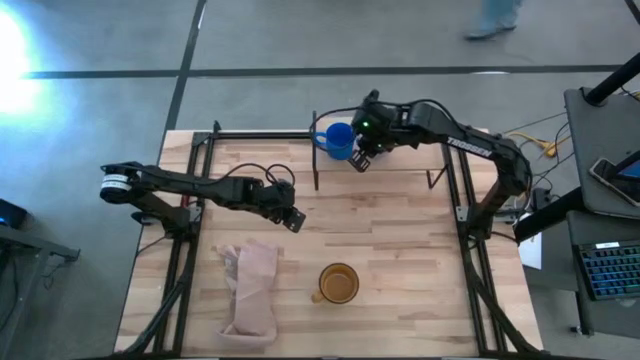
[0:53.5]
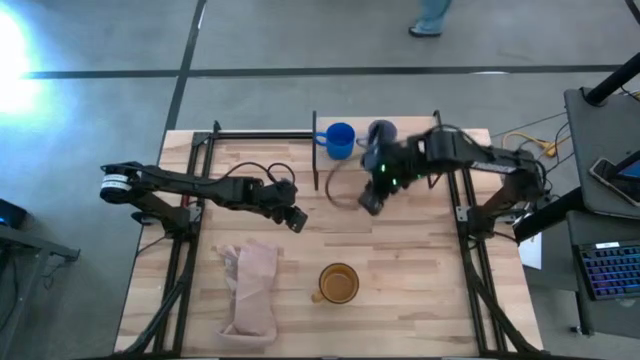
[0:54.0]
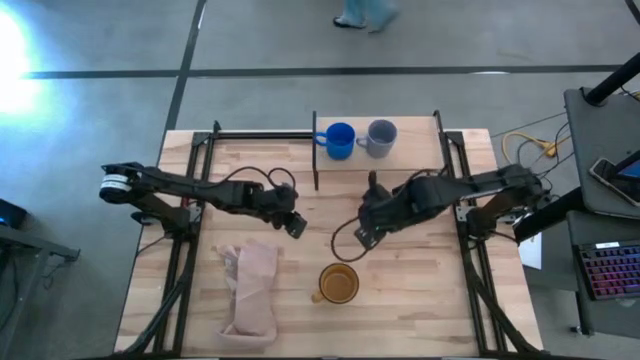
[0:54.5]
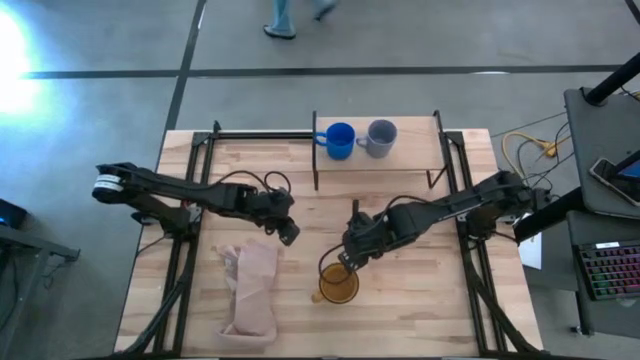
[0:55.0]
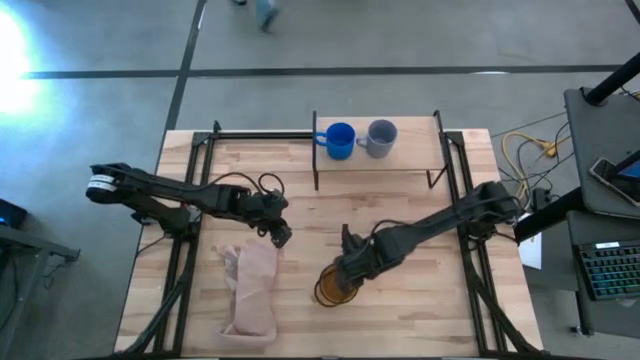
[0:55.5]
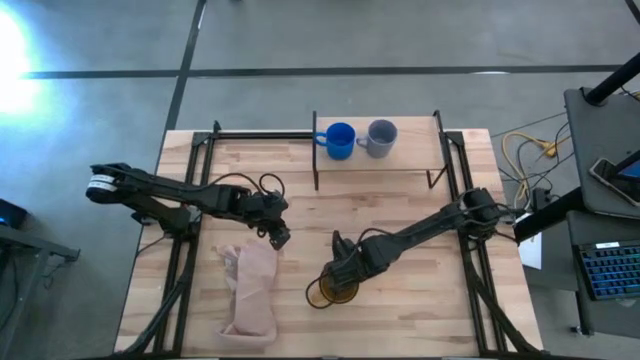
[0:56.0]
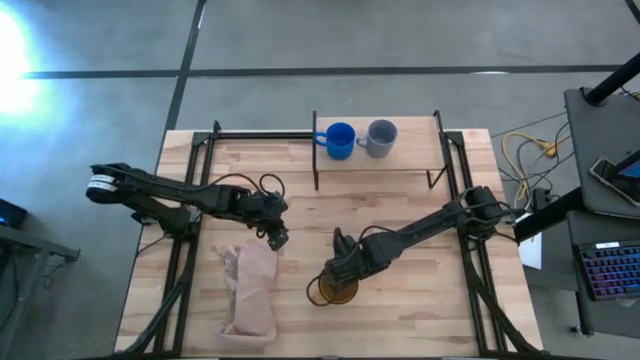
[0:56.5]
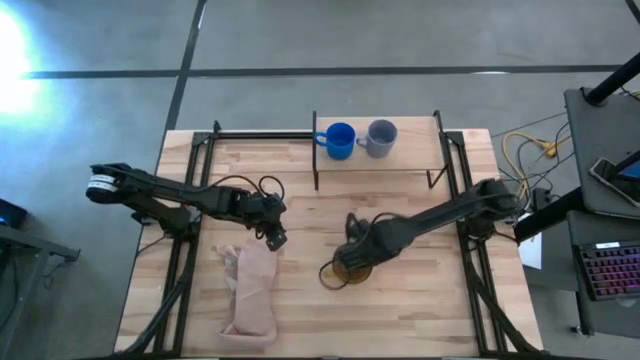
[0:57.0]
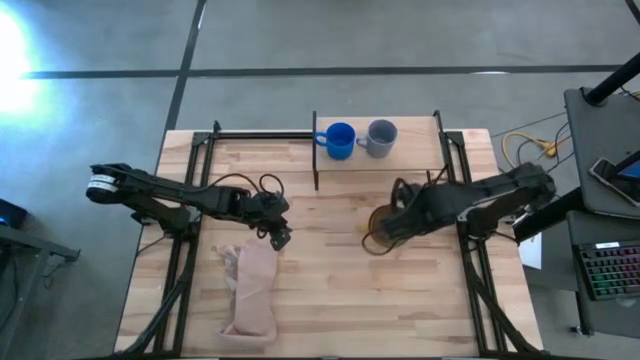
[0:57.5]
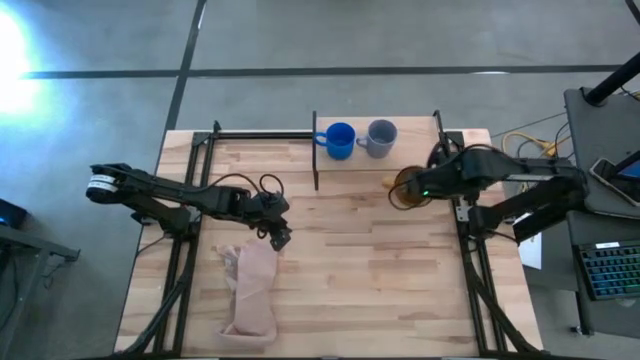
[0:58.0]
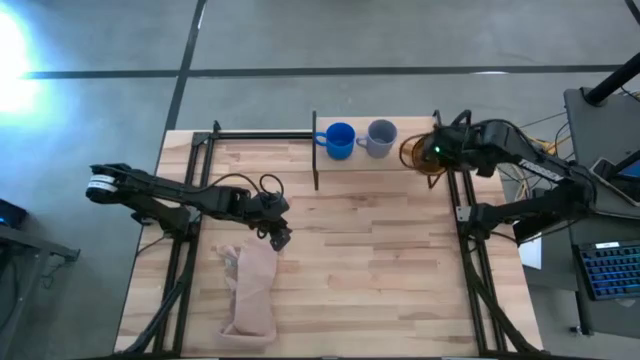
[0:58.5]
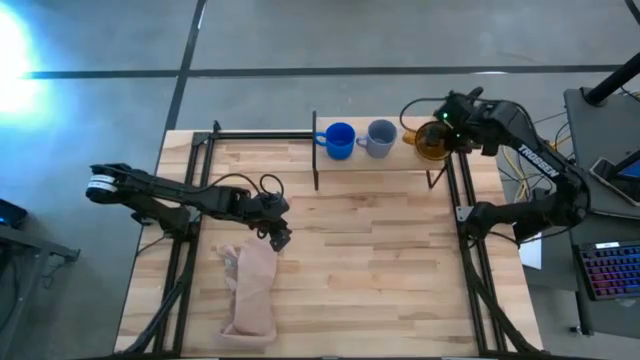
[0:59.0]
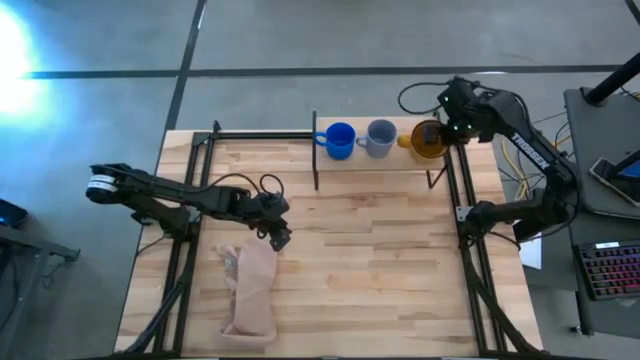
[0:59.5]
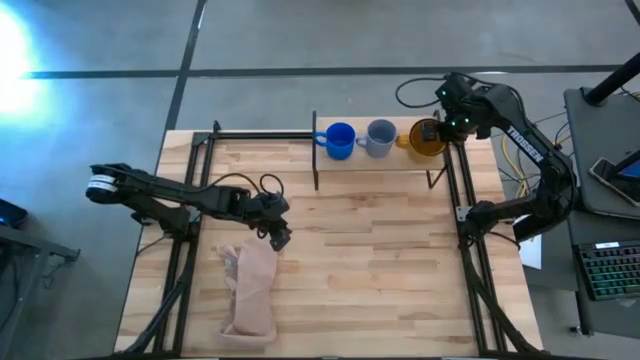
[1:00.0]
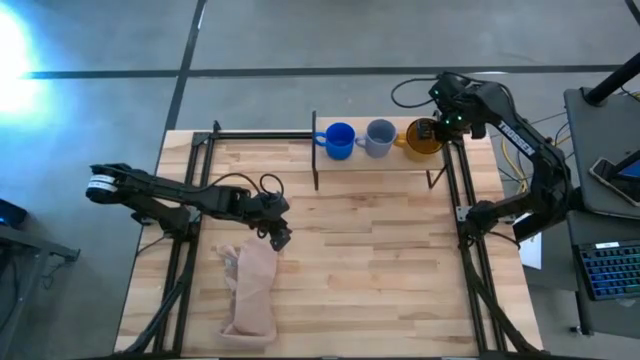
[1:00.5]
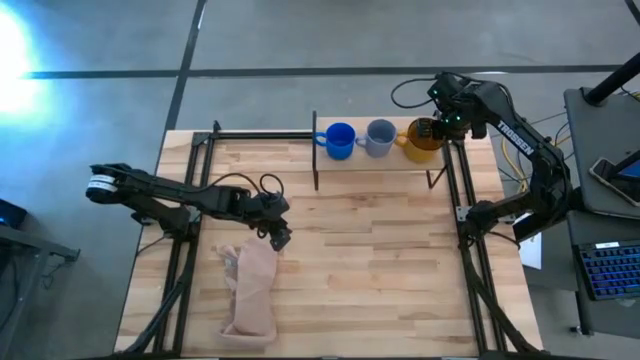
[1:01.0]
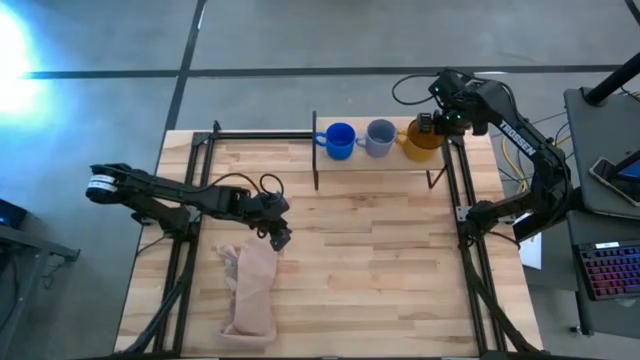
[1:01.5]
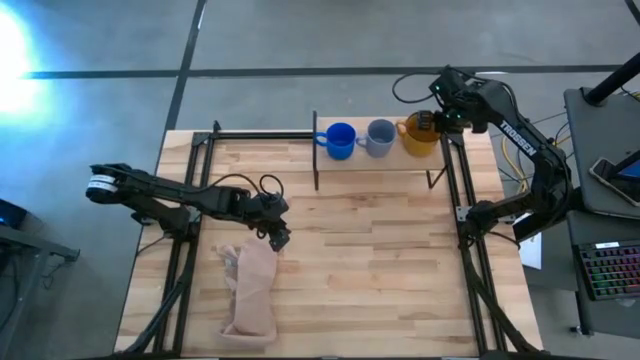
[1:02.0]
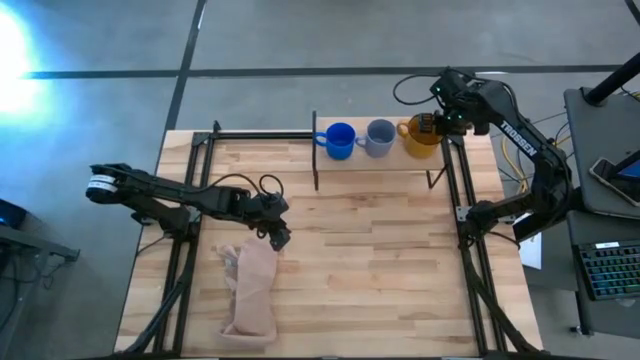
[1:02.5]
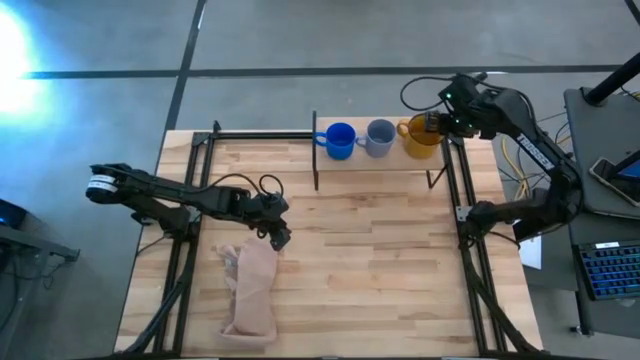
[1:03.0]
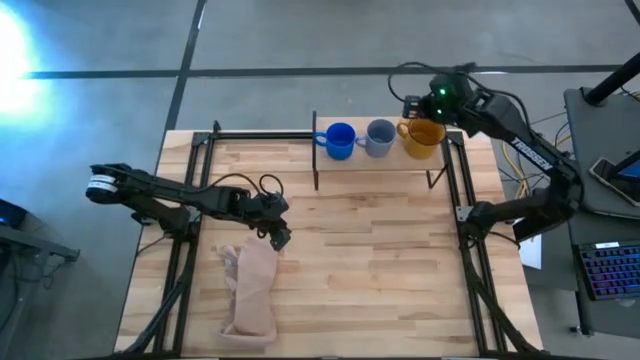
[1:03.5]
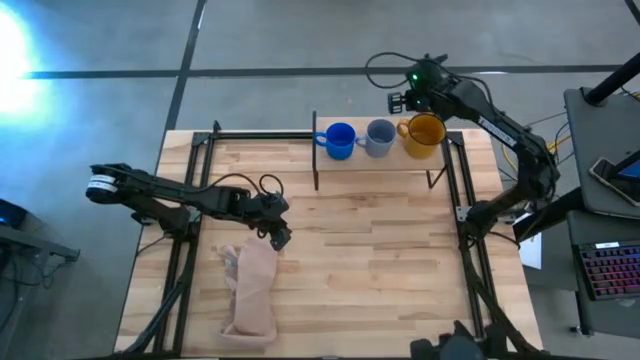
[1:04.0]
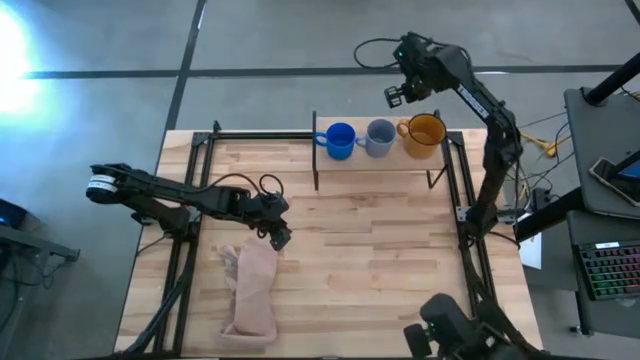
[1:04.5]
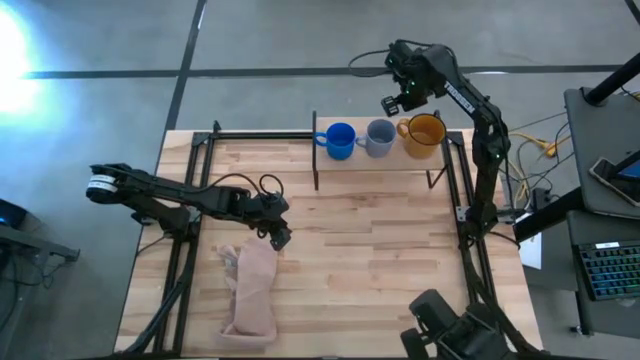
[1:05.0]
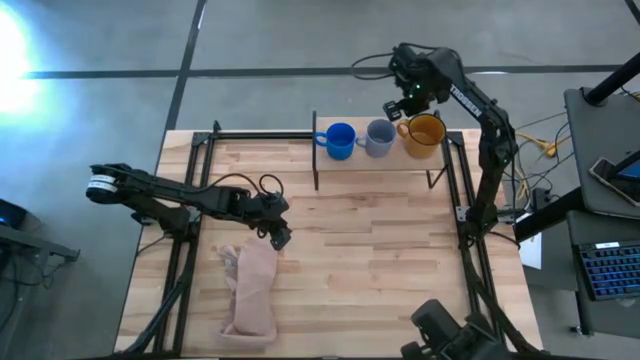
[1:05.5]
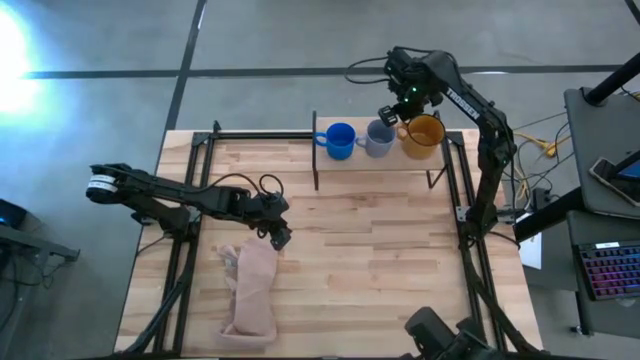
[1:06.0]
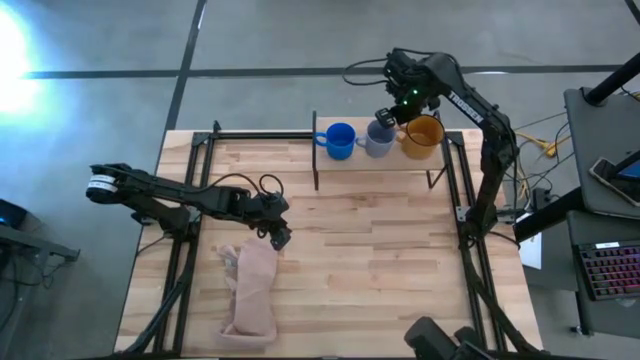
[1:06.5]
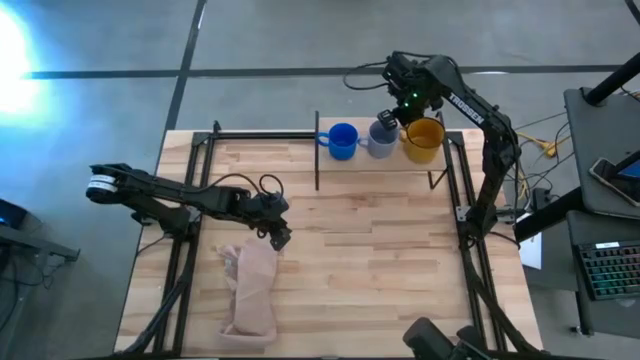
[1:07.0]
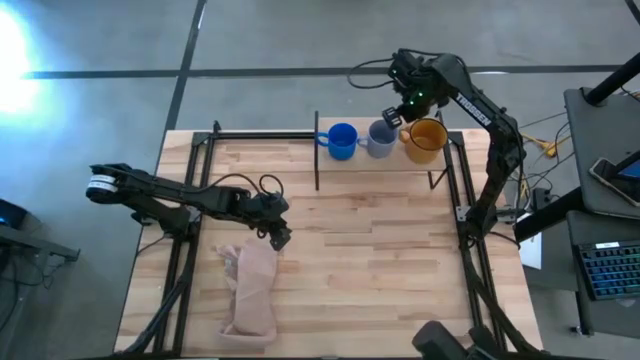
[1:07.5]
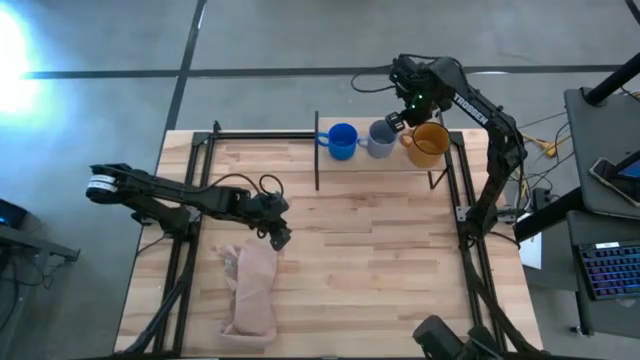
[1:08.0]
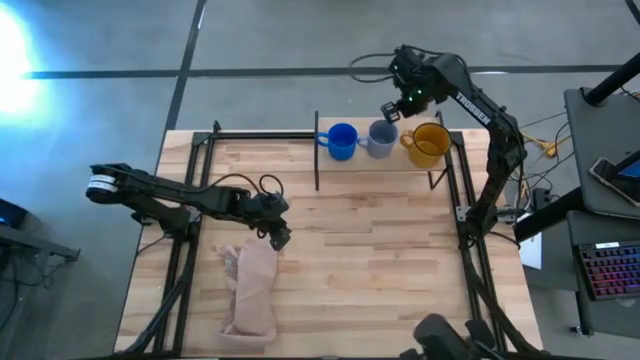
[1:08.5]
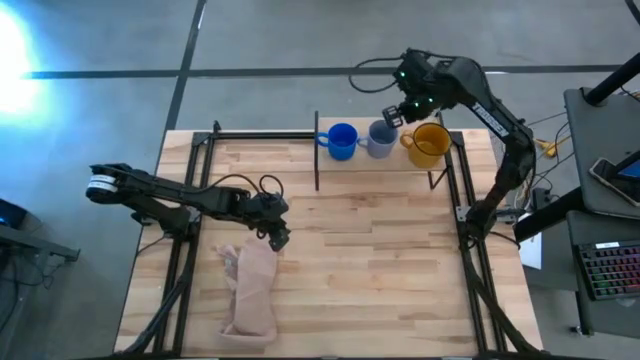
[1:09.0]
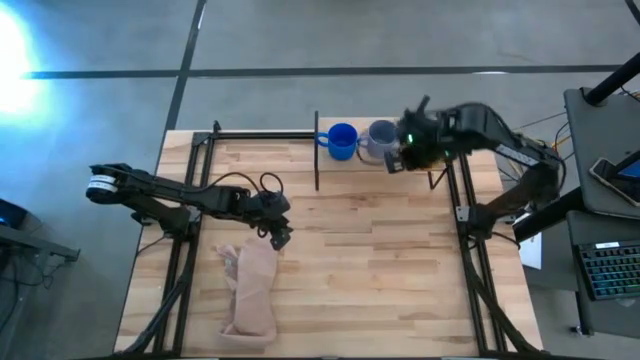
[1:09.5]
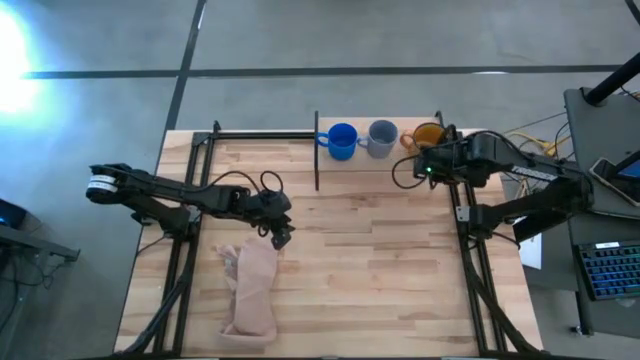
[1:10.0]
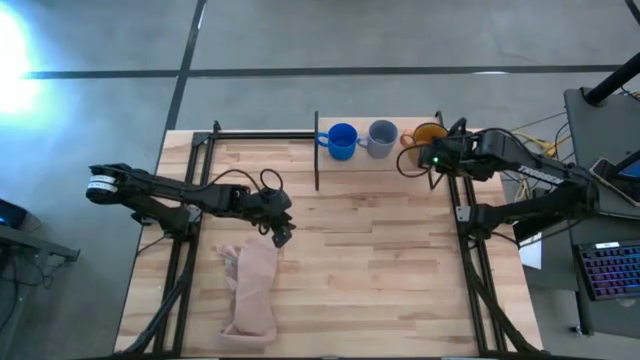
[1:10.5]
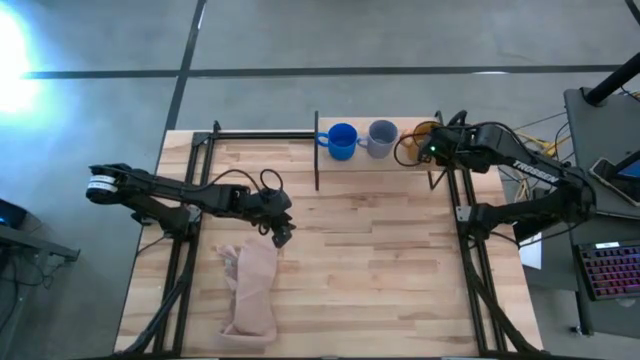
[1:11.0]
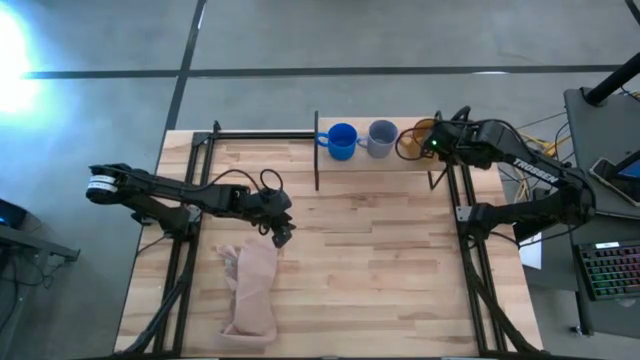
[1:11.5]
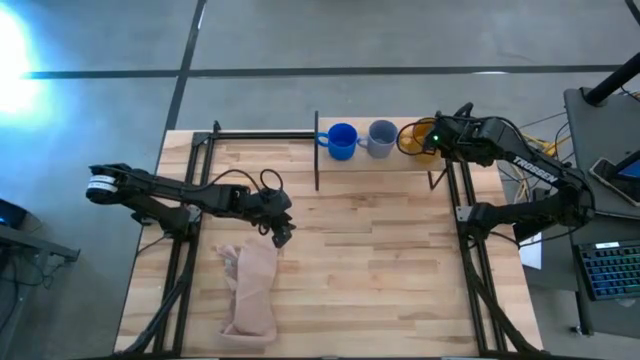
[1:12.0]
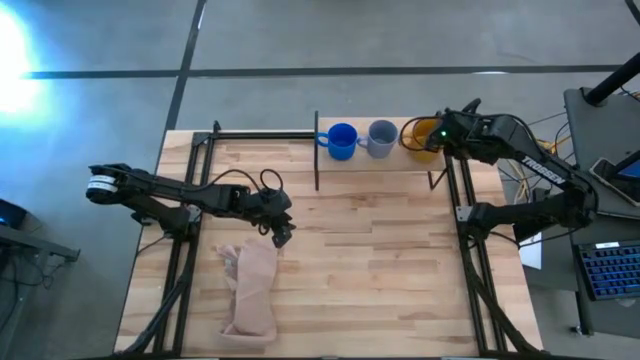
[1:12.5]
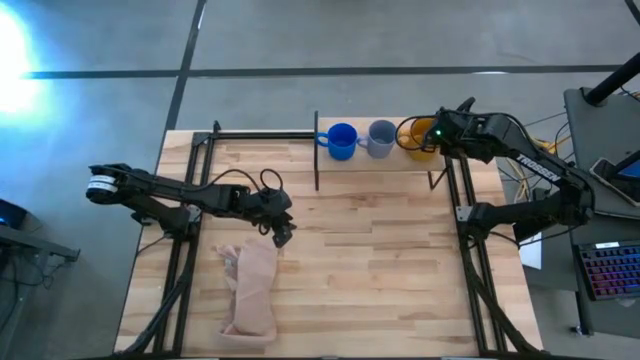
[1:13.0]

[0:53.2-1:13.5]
Task: Stack small to large cups/mugs on shelf
Put the brown mug on the shelf

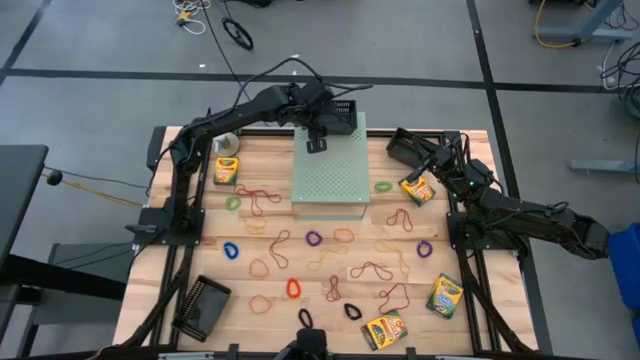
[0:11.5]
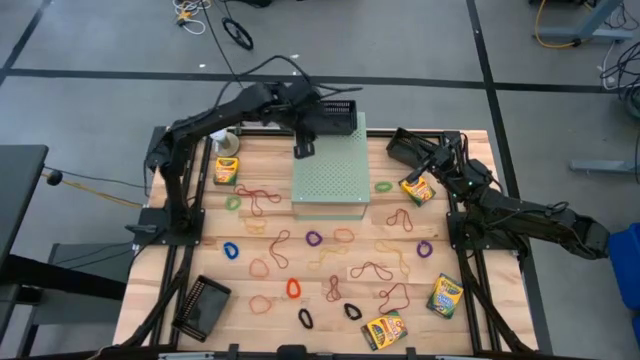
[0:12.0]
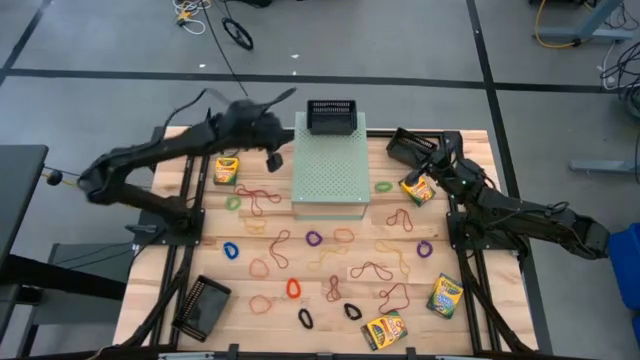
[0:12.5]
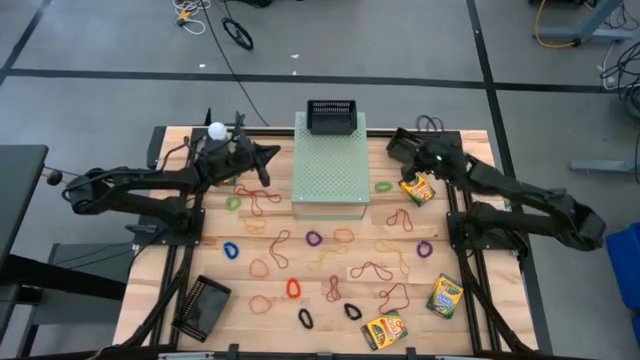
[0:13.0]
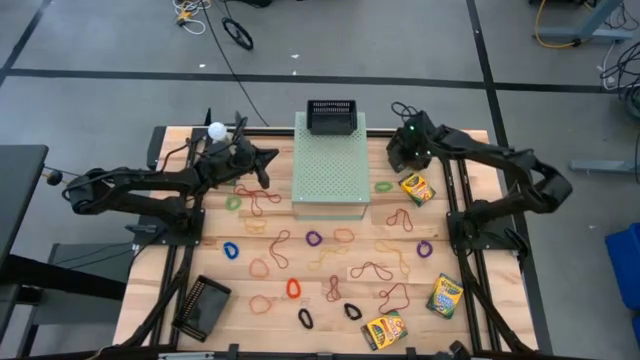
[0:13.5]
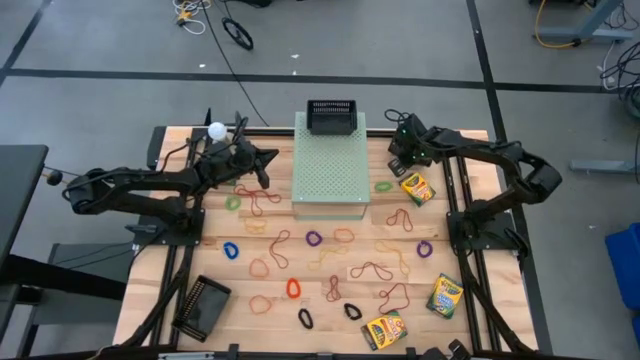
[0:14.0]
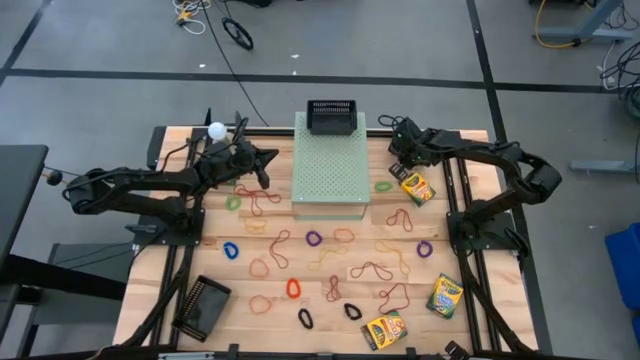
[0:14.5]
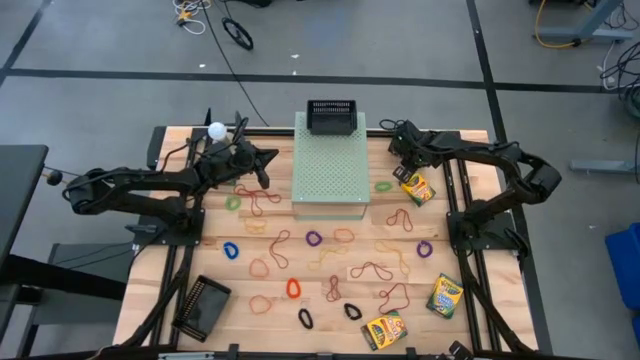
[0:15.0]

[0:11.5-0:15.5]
Task: Pick & Place Office Desk Supplies
Put the top black bin on the shelf aligned with the other black bin
